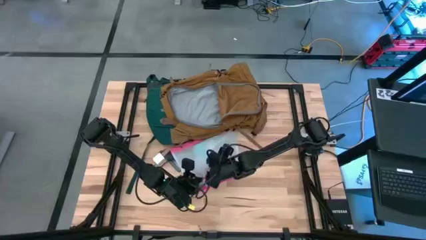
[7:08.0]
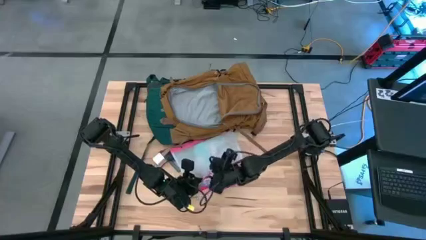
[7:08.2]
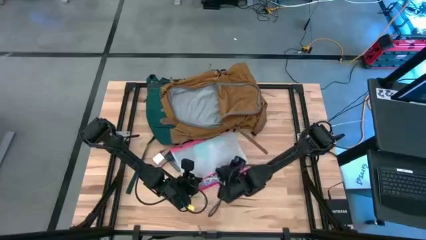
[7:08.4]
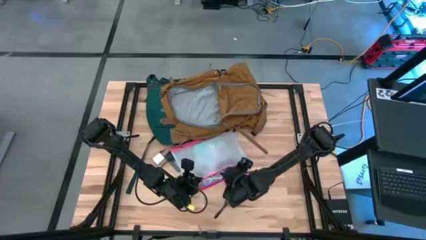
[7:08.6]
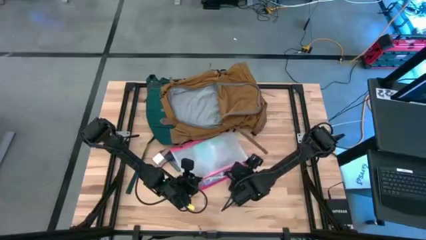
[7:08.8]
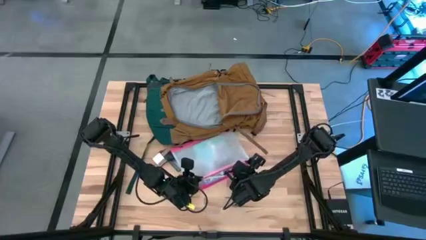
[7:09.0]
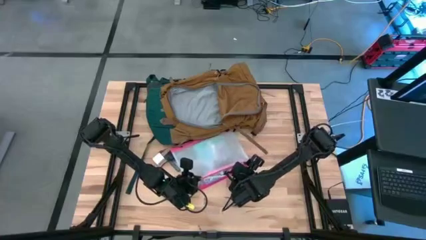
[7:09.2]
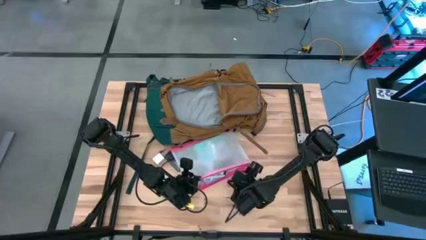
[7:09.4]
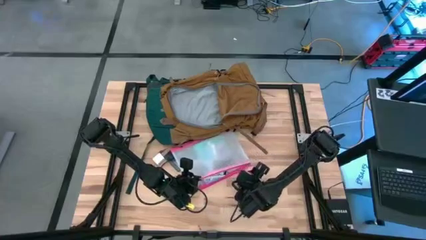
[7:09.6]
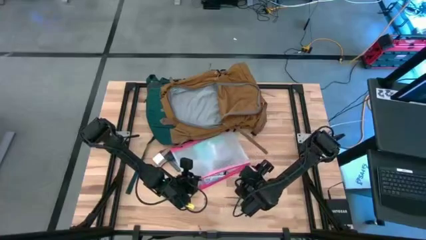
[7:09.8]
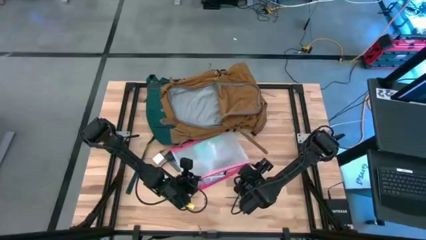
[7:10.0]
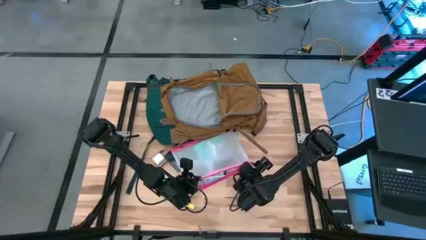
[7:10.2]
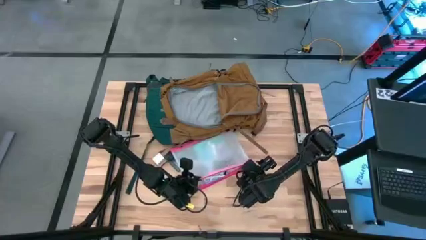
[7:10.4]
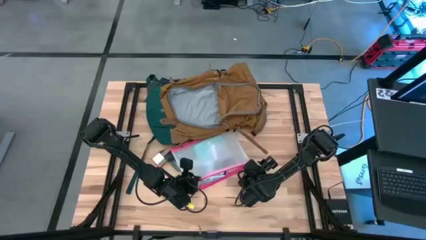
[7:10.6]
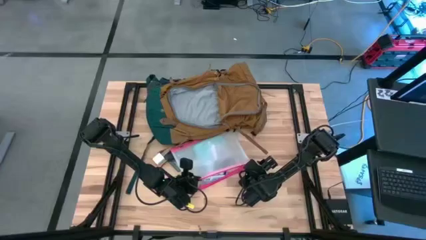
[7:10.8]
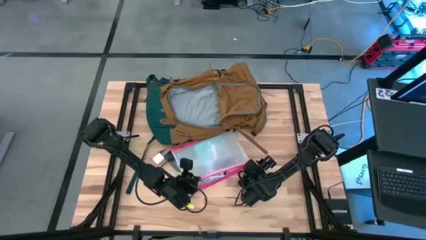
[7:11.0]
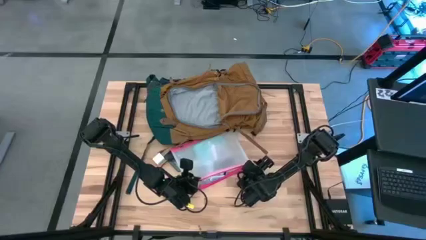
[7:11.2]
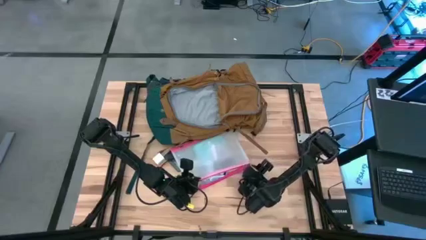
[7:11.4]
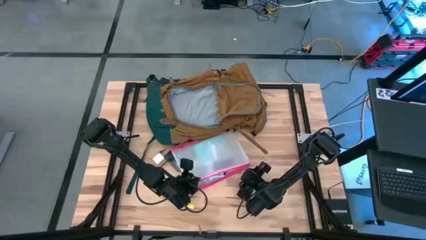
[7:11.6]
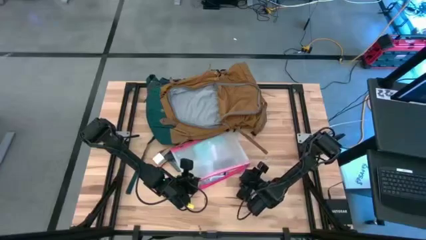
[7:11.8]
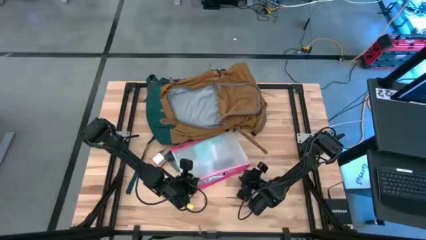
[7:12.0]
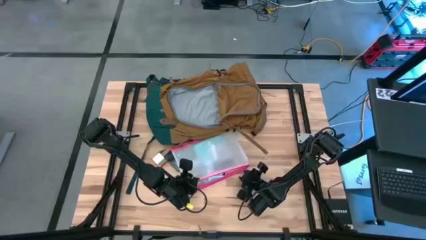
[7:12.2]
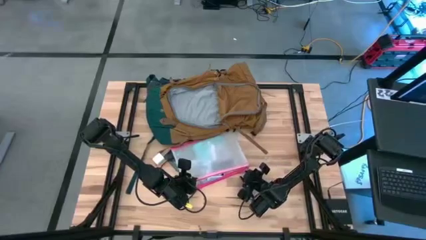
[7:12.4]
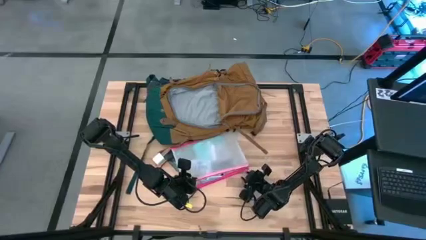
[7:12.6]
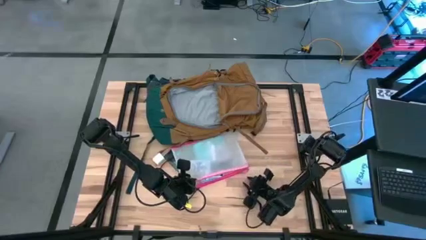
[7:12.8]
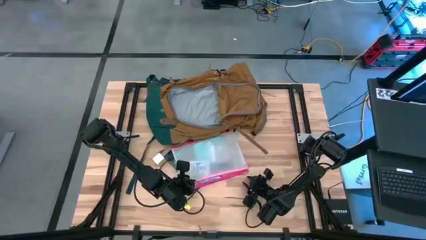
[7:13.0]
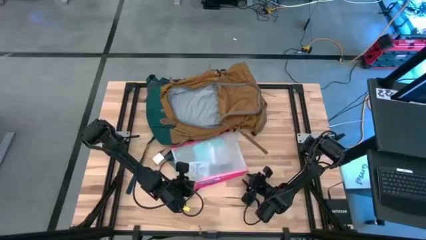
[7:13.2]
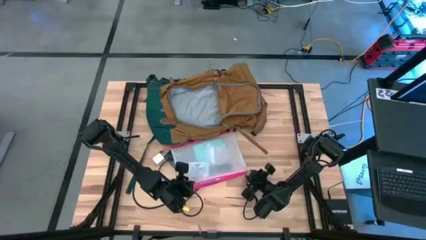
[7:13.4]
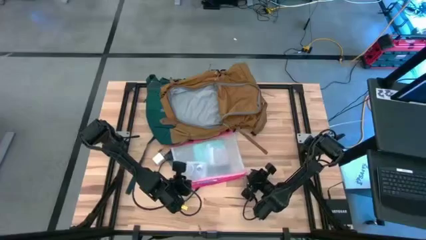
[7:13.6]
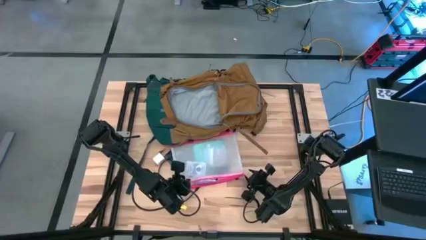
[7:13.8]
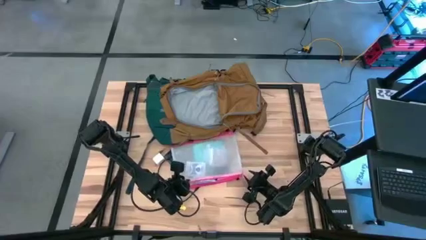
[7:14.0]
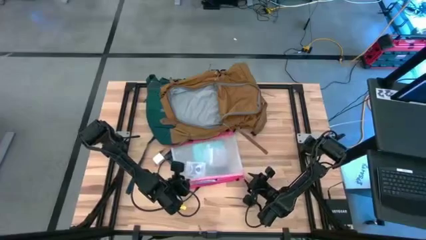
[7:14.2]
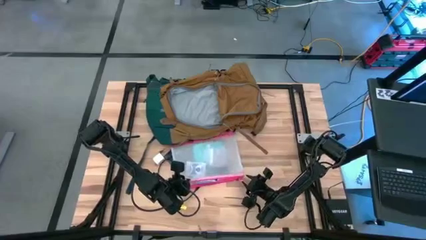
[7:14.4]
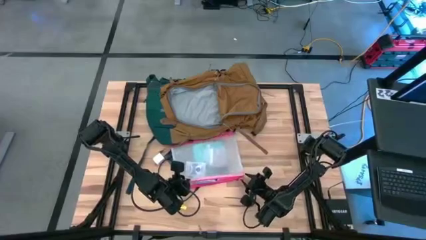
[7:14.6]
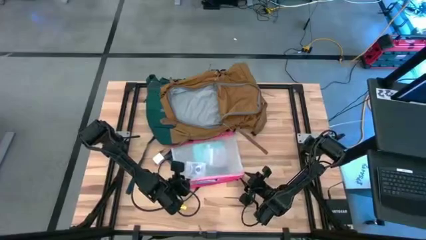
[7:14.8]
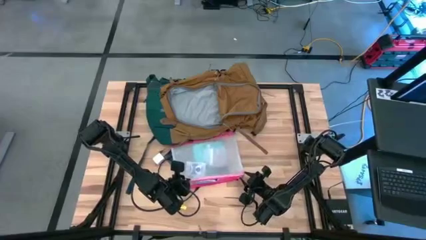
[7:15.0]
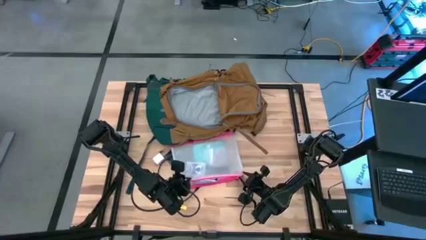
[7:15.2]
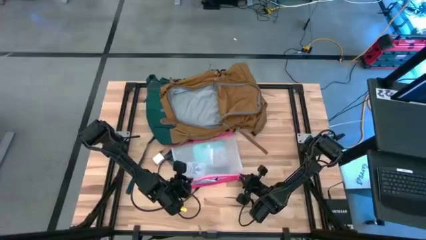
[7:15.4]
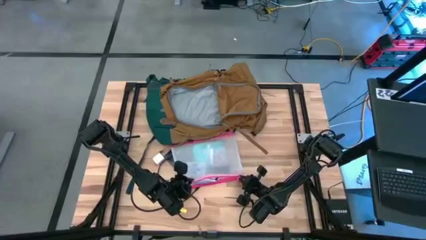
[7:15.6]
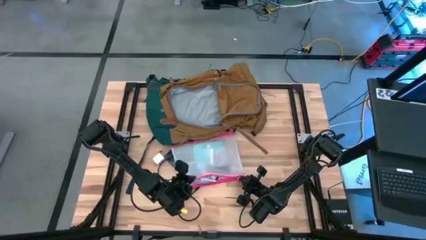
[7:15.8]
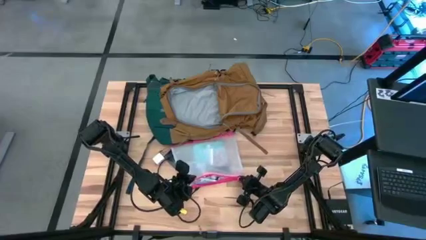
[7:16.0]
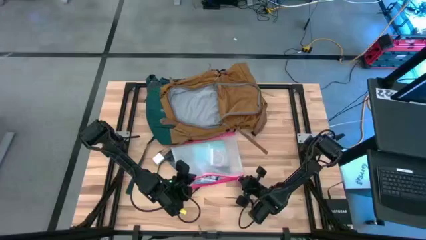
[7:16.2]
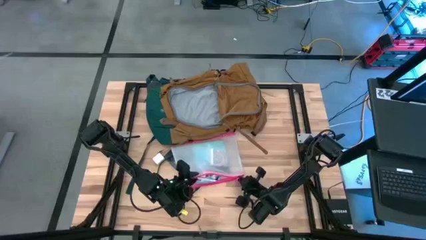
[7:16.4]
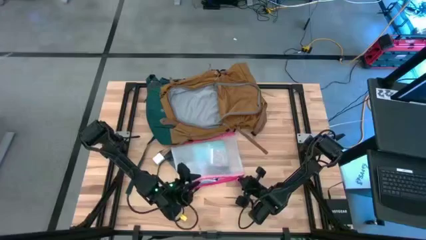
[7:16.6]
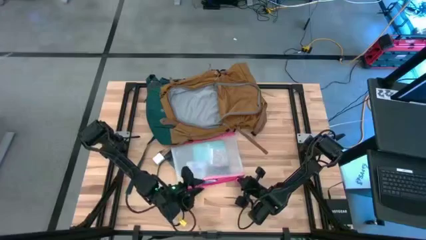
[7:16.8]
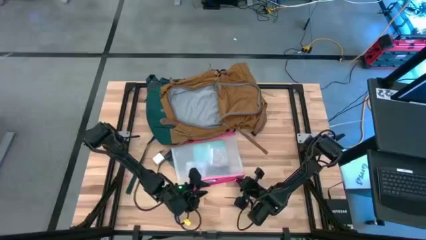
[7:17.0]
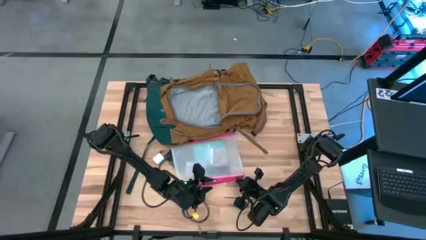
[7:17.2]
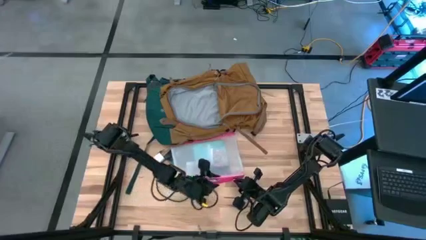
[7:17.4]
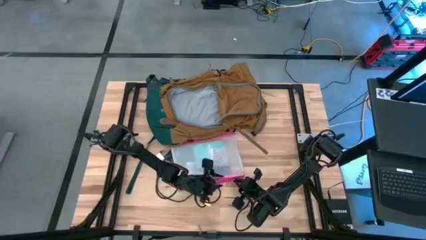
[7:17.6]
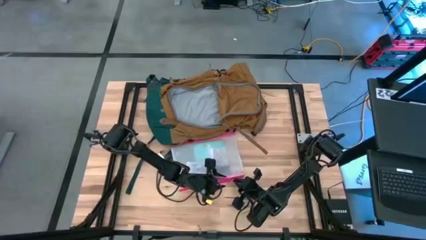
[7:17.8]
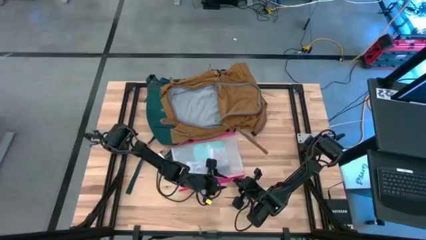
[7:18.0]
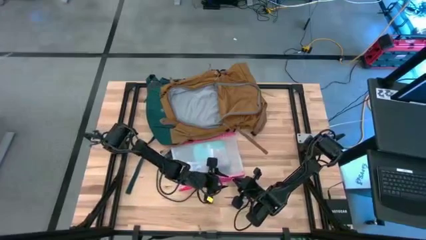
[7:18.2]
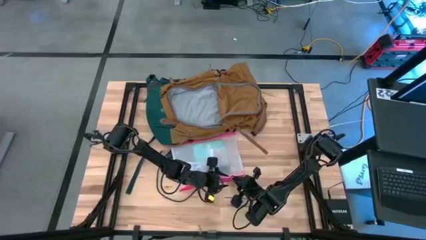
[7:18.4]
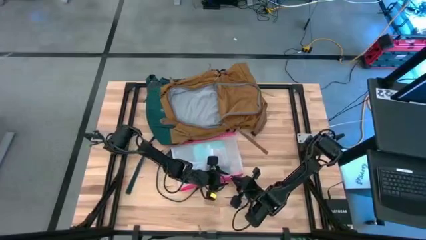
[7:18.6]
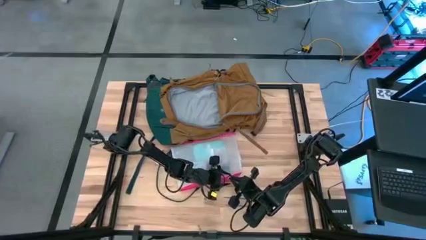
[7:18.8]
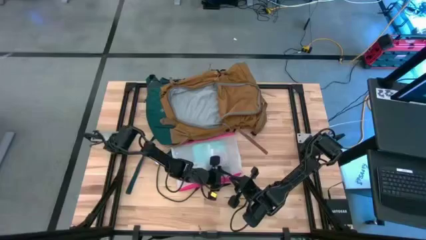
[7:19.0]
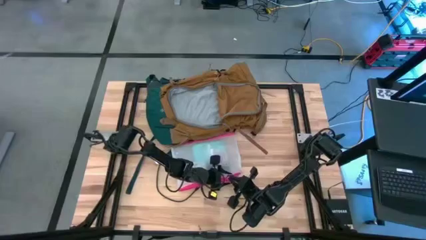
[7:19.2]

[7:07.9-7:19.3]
Task: Unpack backpack
Close the pink zipper pouch

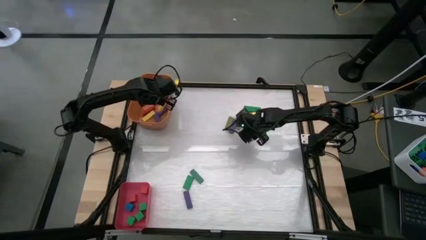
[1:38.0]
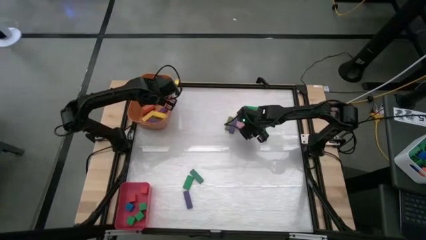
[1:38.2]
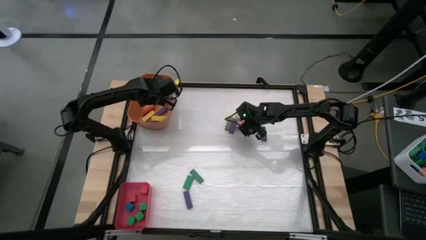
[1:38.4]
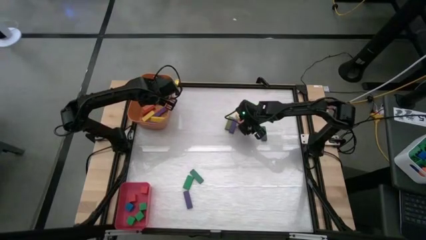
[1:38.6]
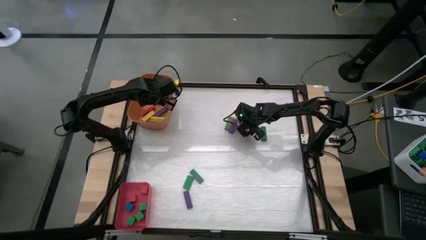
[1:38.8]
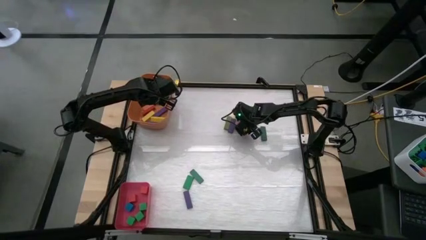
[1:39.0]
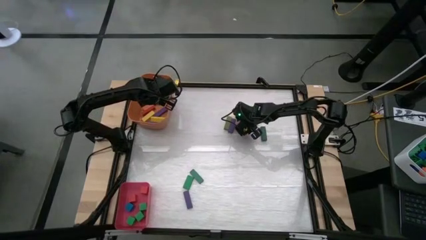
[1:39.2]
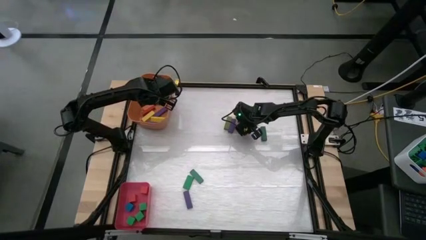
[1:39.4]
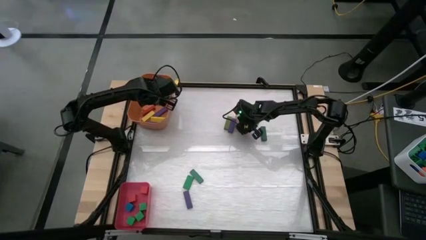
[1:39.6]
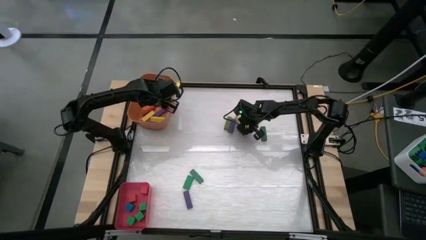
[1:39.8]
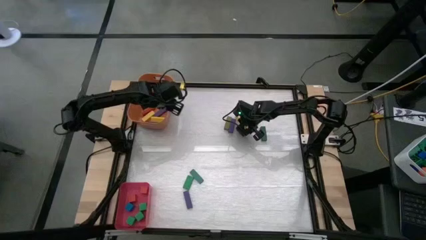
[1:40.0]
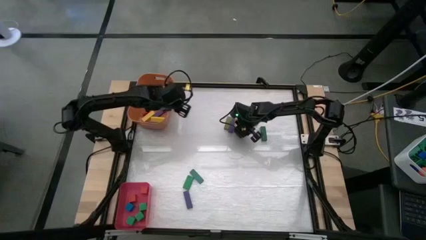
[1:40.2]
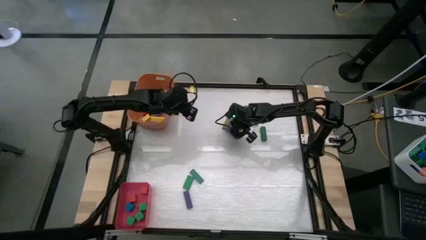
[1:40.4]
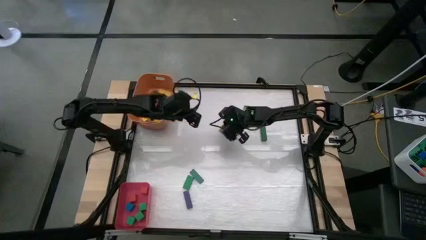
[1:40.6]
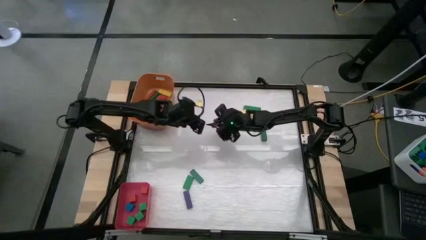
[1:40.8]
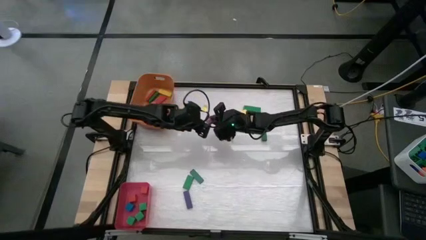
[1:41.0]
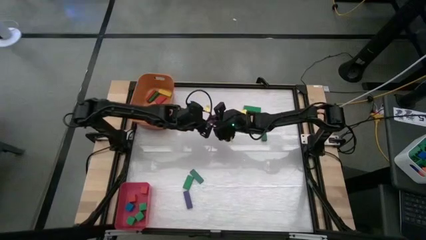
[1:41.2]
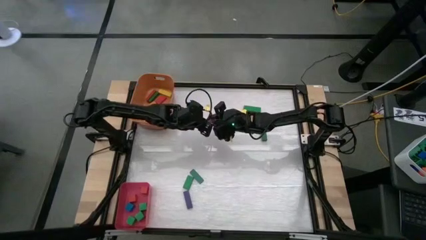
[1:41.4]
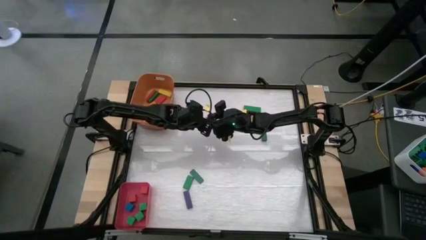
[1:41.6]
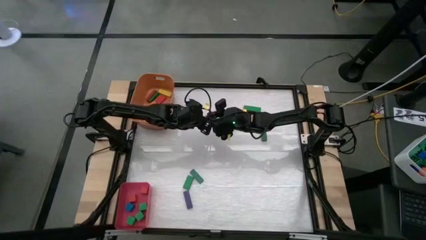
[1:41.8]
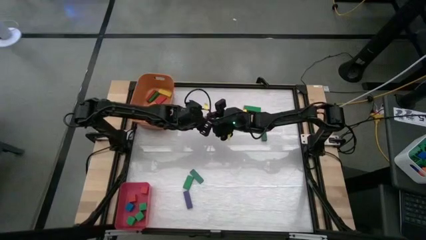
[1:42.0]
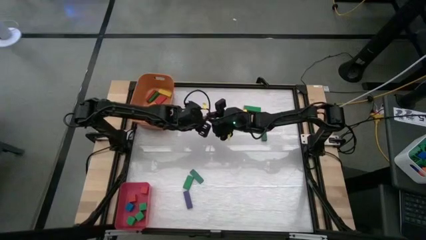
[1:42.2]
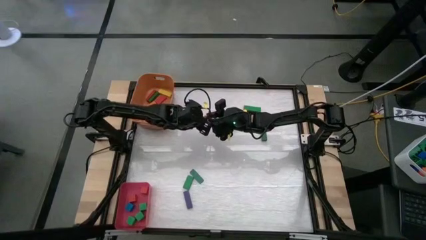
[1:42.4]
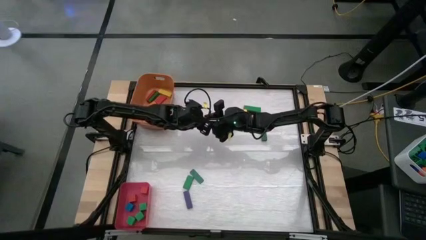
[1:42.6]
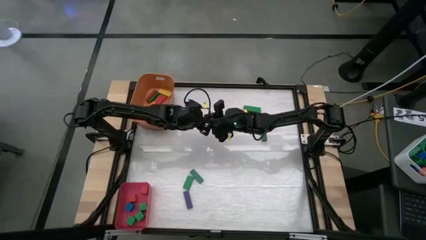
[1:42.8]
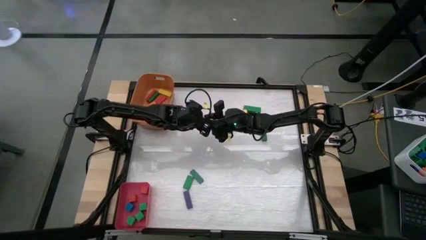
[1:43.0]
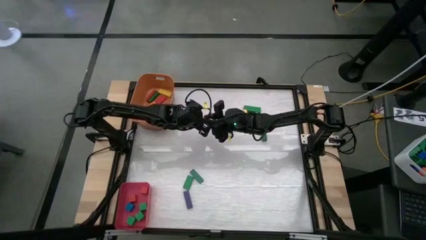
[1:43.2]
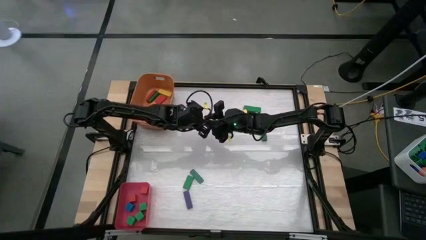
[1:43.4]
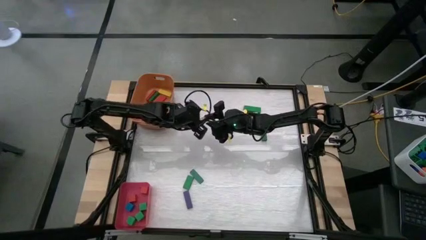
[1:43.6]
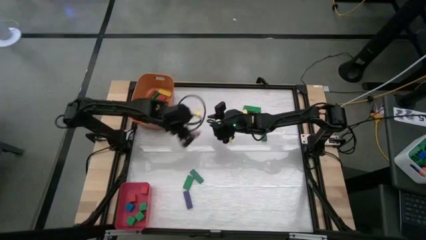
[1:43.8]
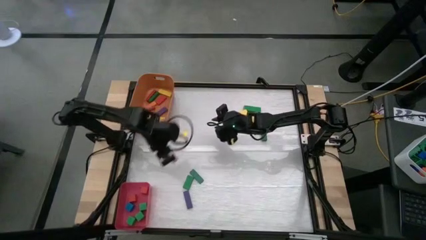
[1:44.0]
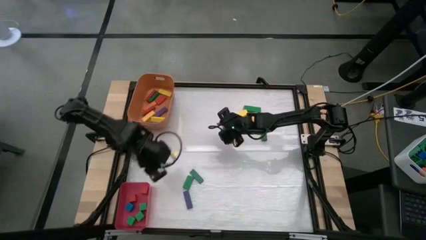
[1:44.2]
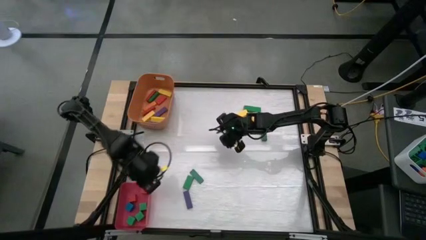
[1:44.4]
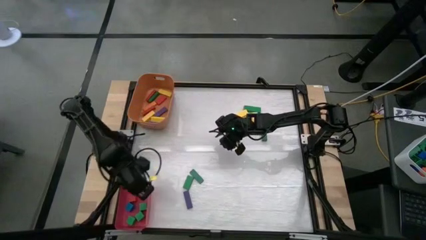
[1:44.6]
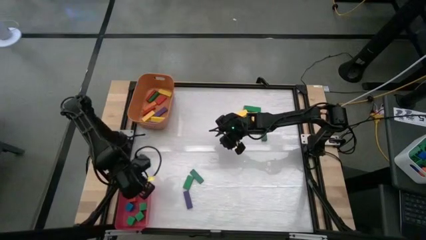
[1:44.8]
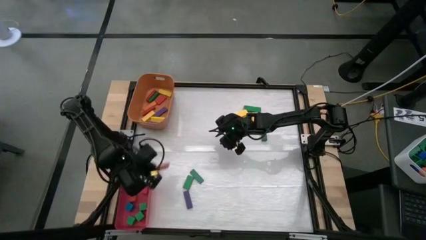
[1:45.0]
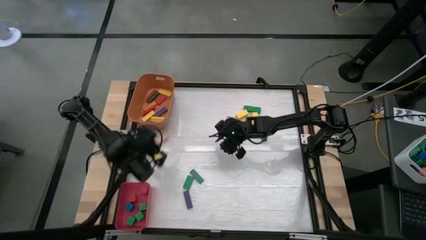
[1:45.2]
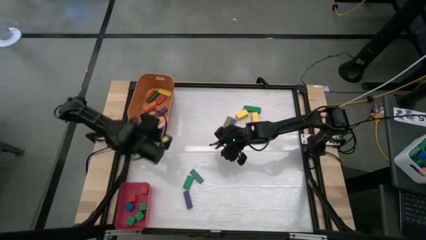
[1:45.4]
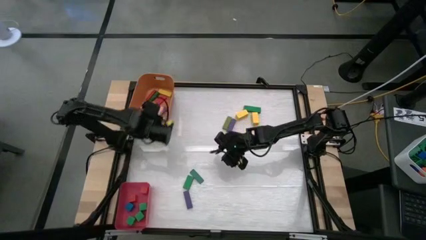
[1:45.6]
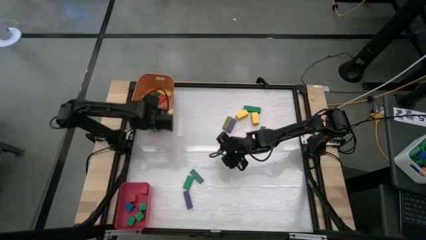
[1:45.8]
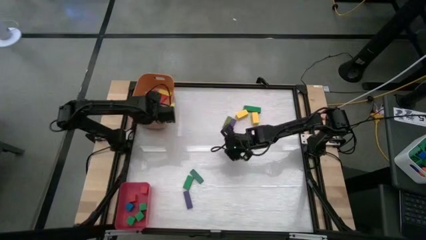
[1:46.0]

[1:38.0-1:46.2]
Task: Sort blocks by size
Put the big pink block into the orange bin
